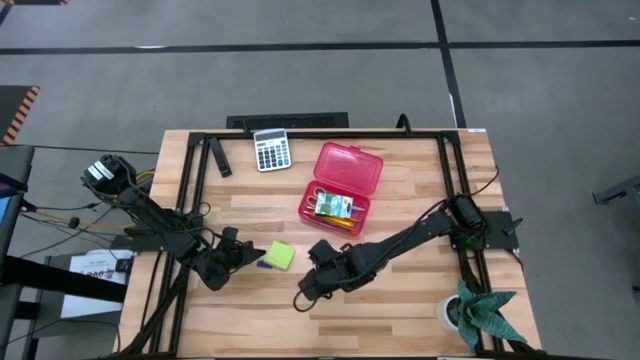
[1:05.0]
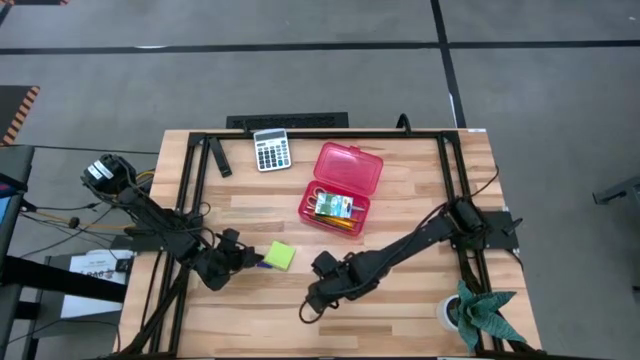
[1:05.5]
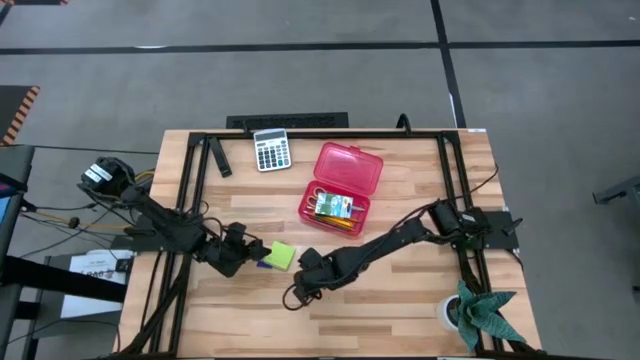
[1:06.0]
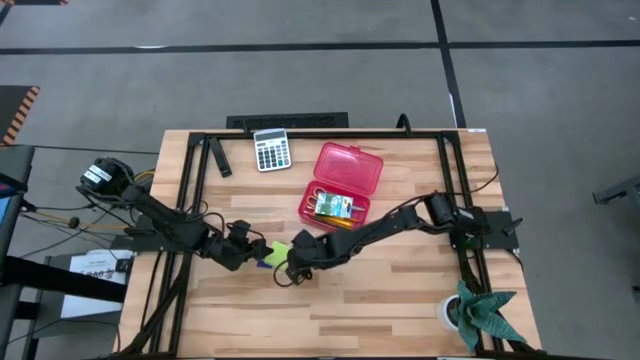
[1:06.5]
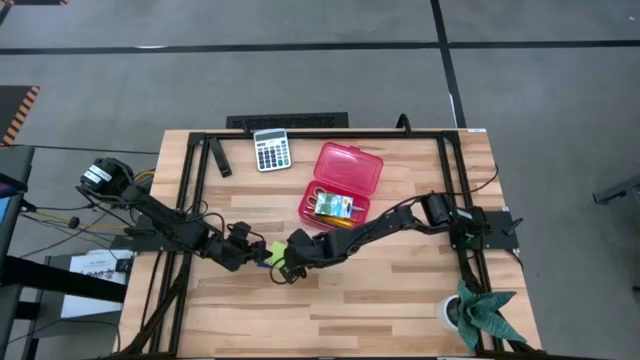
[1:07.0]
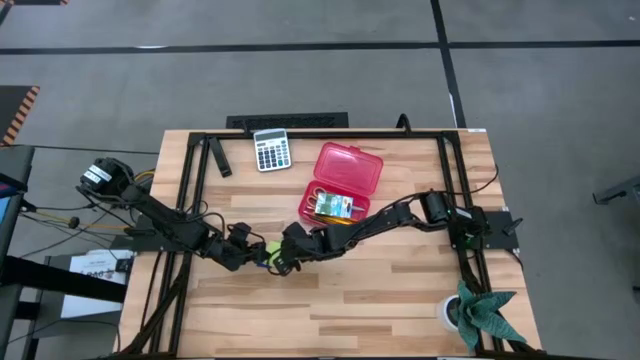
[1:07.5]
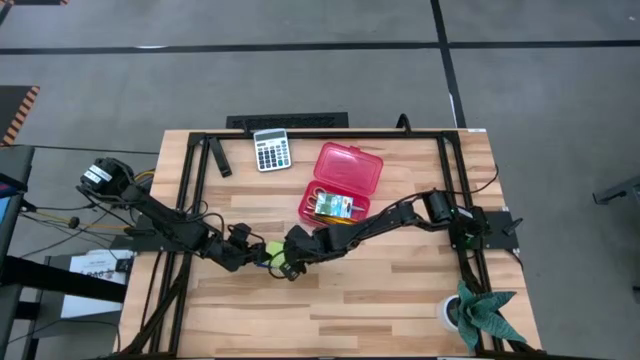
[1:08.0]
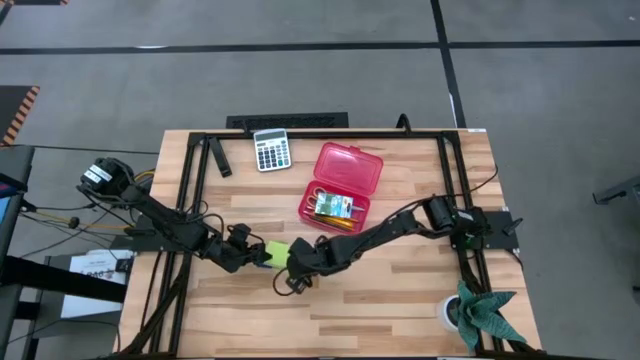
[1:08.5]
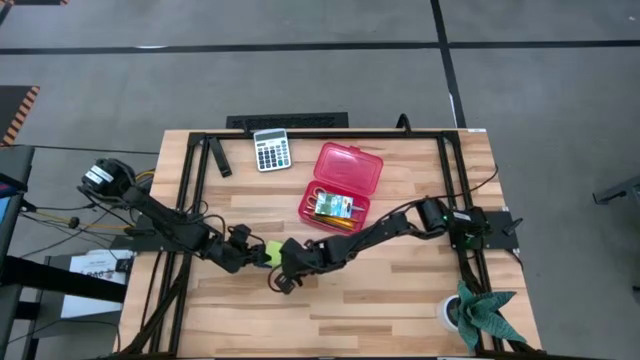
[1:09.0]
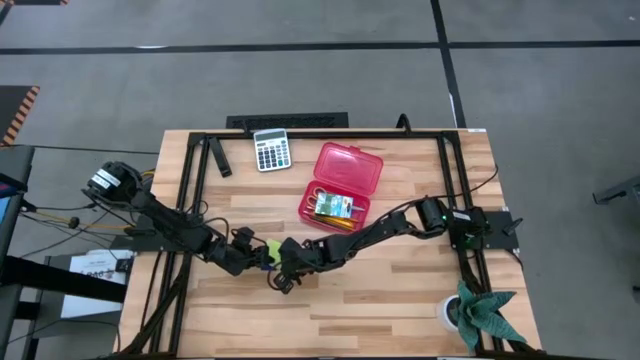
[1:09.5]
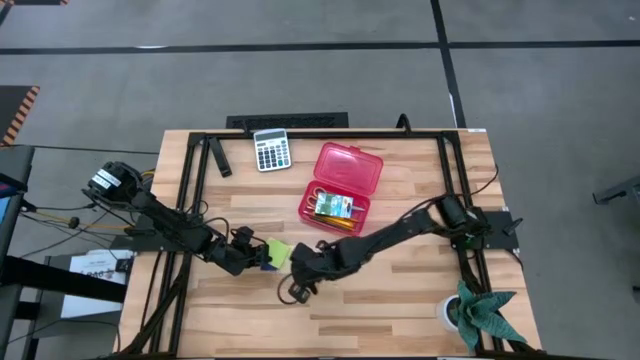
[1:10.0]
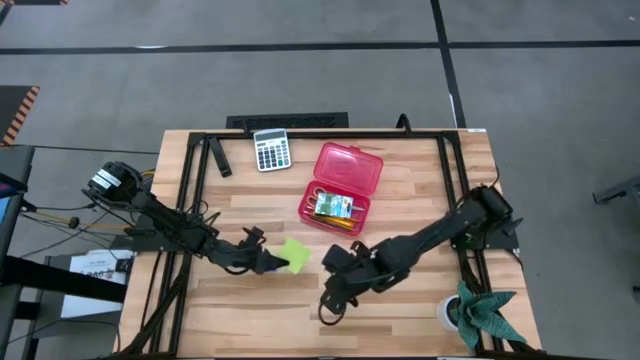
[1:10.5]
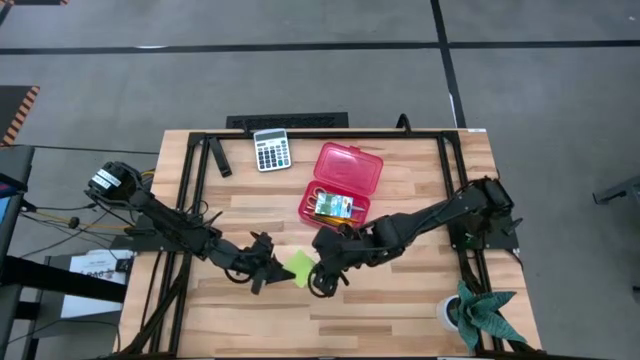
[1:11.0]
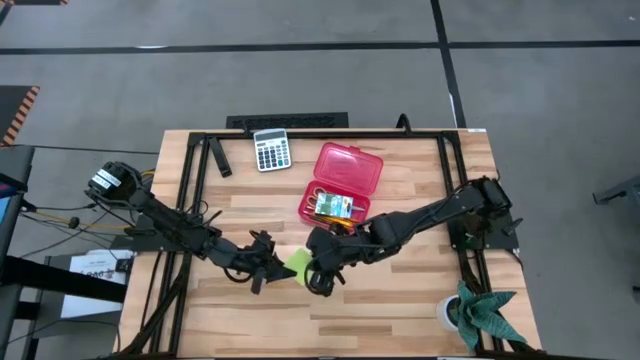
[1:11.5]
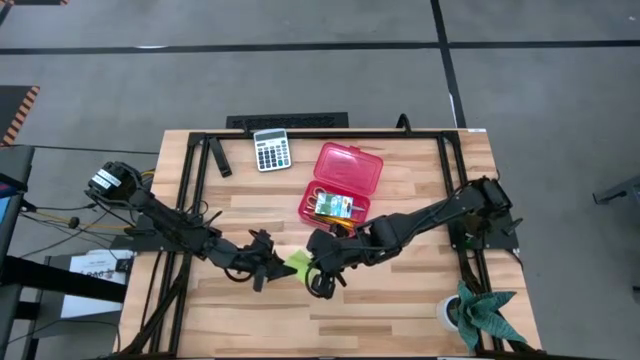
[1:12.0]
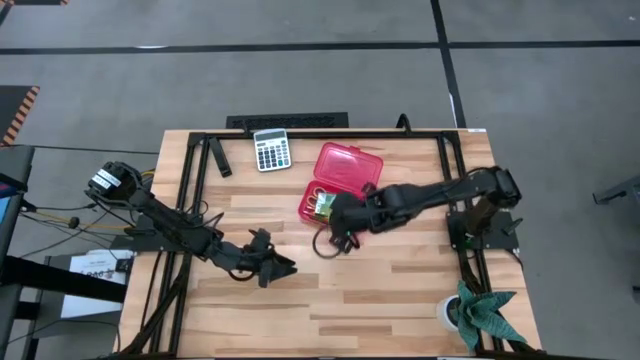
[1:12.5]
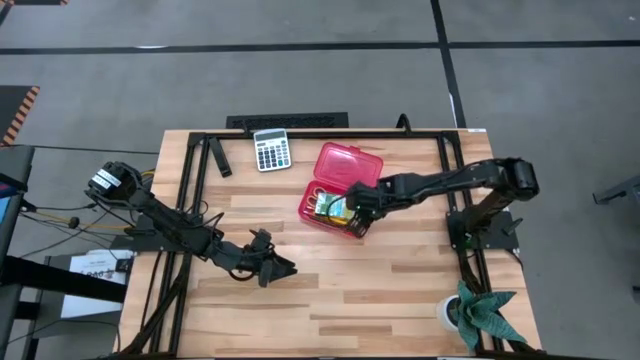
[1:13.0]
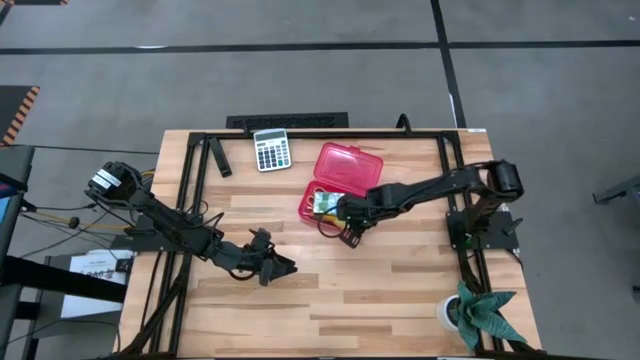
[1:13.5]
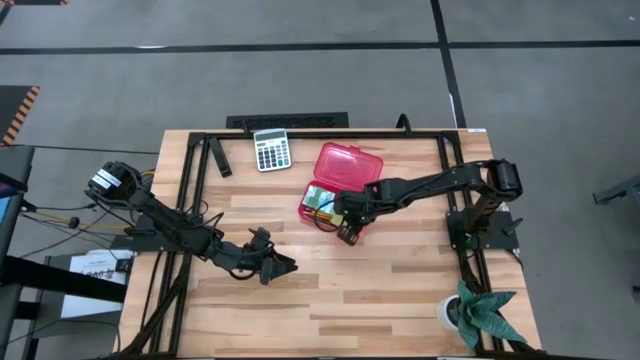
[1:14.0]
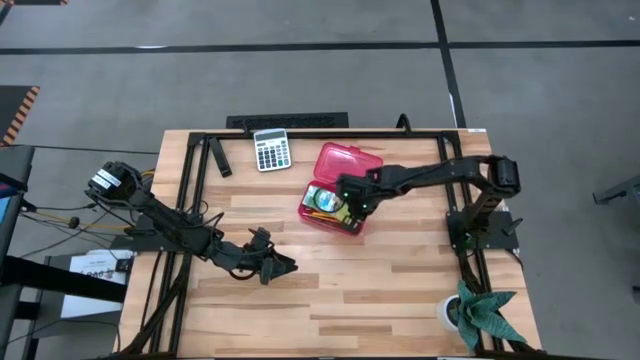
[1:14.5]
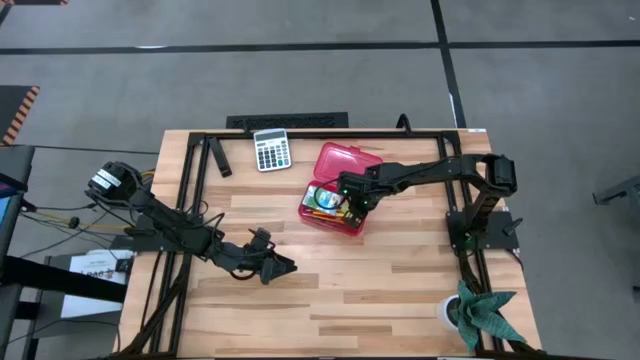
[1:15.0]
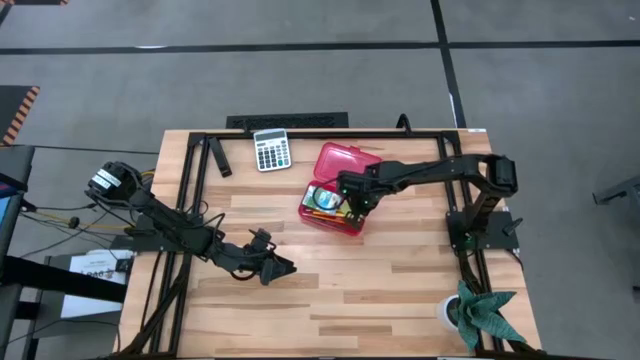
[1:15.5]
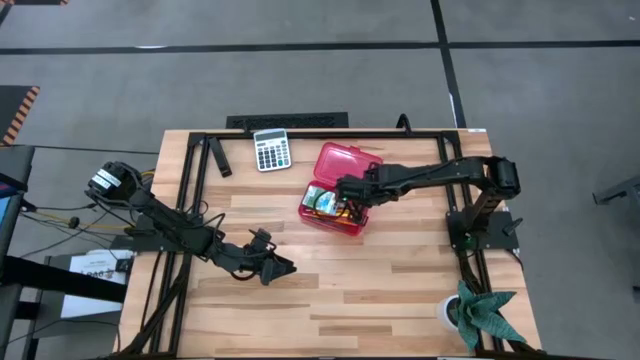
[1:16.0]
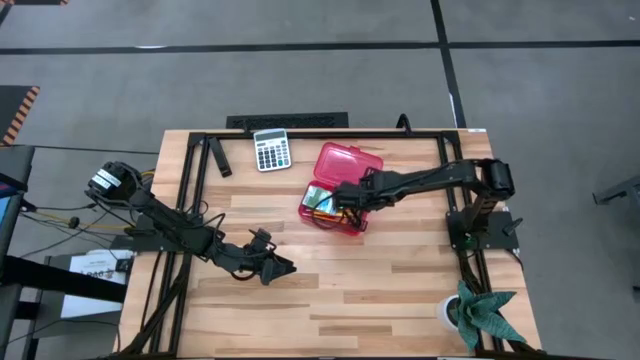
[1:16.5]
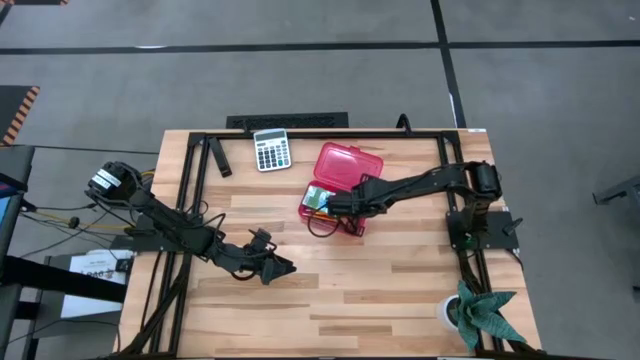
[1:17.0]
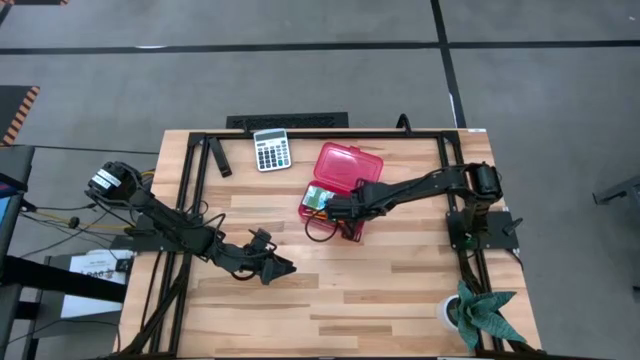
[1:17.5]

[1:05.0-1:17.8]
Task: Pack school essentials
Put the sticky note into the supply box

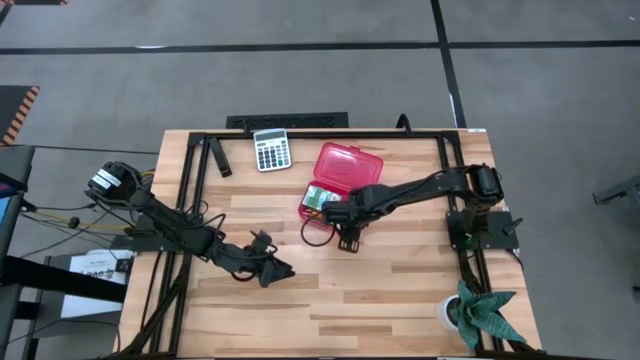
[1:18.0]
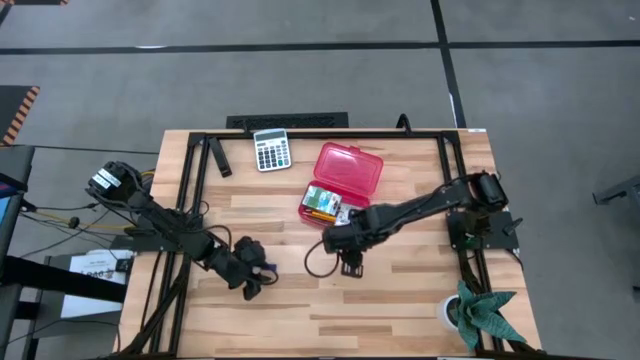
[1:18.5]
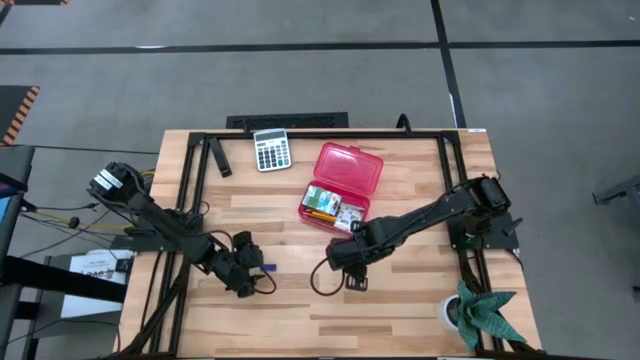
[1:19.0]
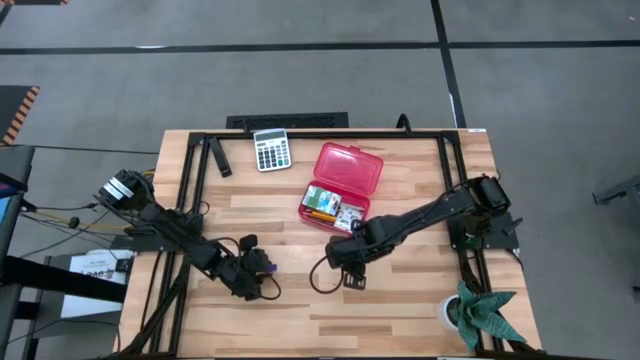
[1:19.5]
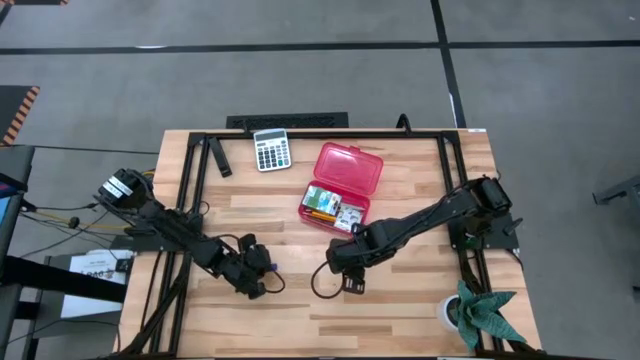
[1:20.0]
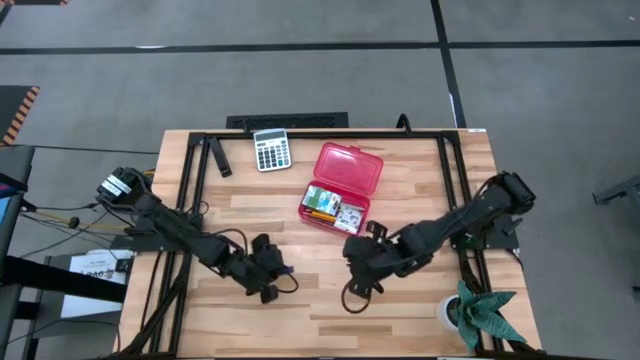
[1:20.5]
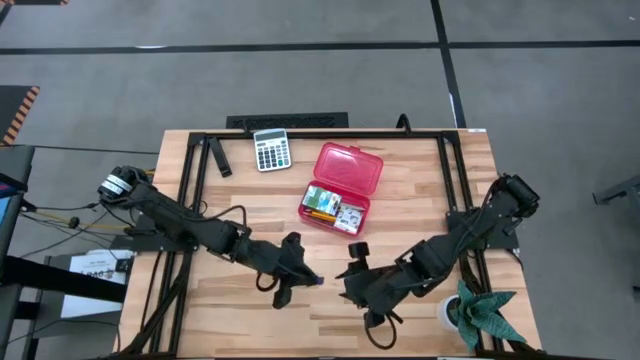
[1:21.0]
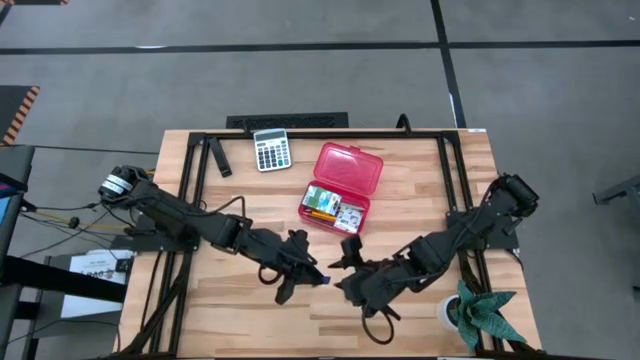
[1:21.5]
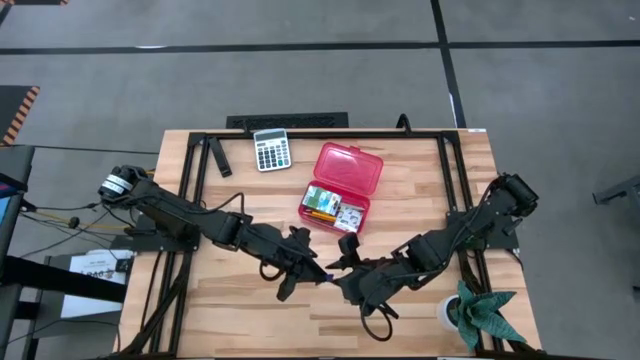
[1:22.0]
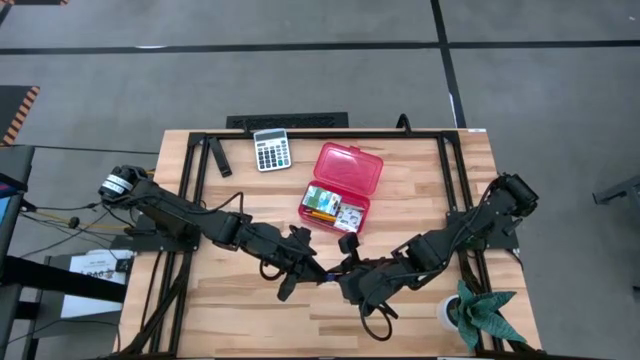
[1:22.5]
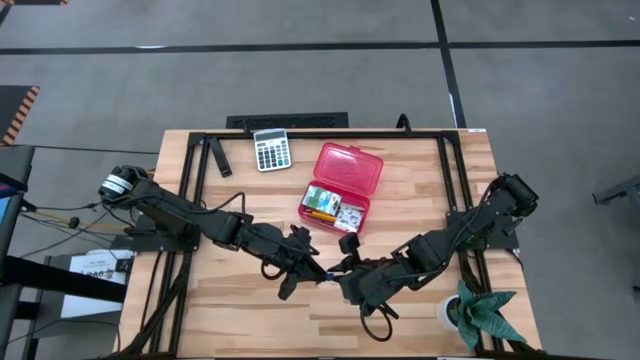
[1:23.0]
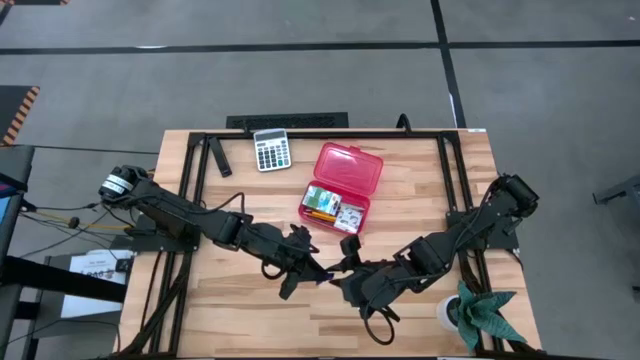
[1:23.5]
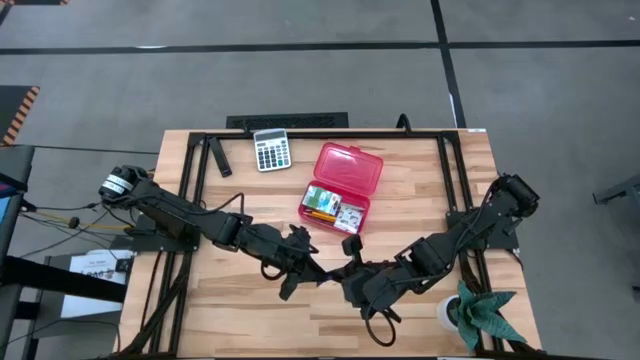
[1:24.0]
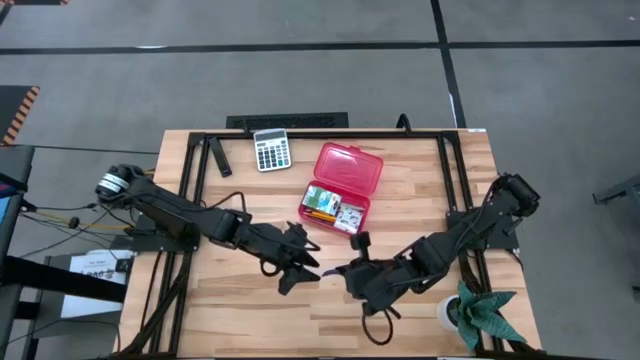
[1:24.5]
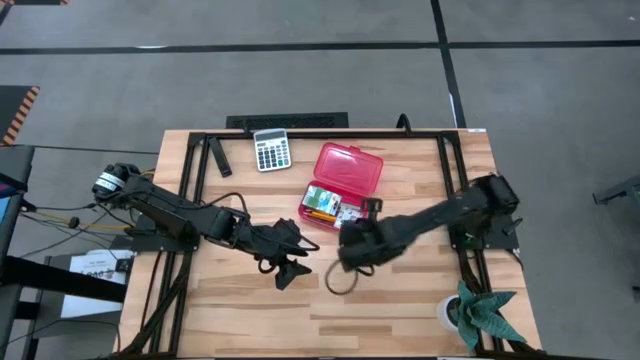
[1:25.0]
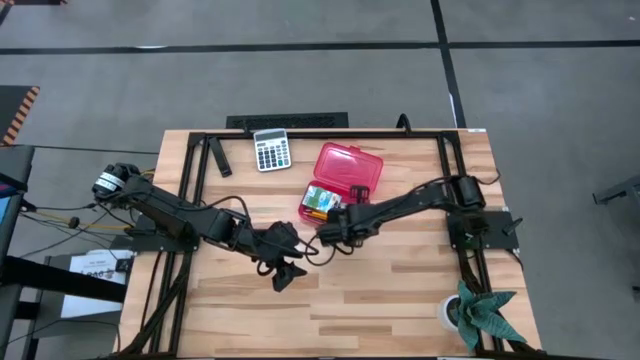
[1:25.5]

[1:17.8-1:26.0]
Put the eraser into the supply box

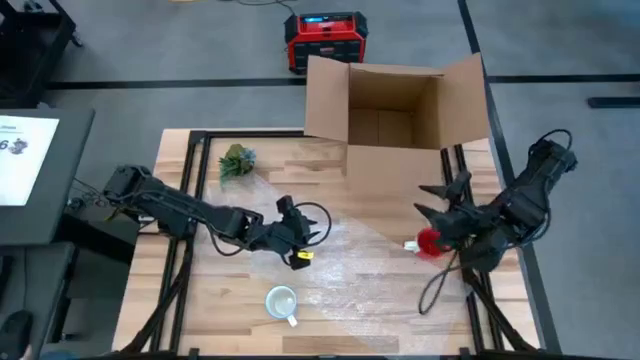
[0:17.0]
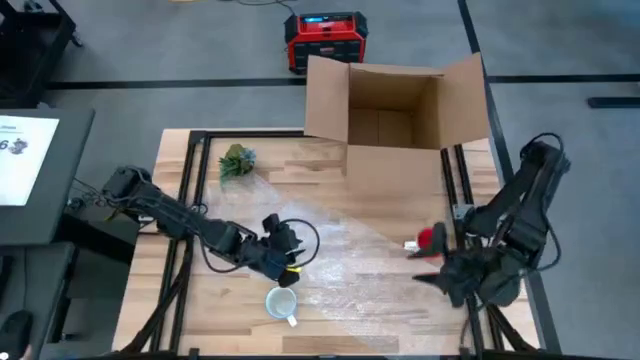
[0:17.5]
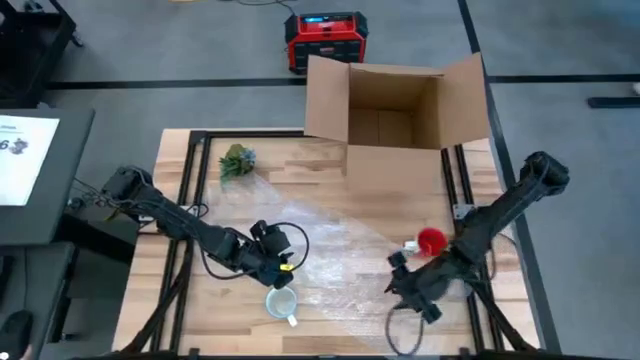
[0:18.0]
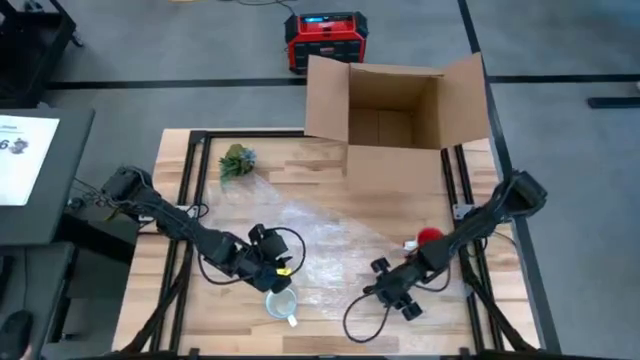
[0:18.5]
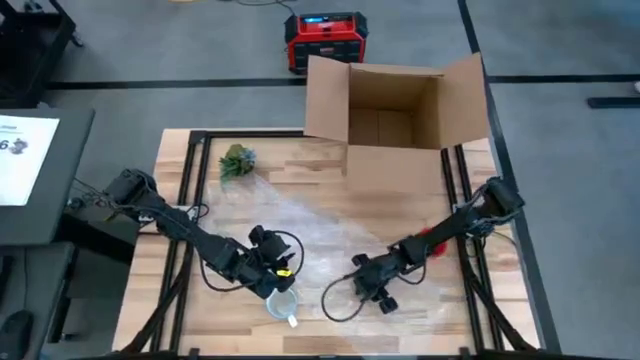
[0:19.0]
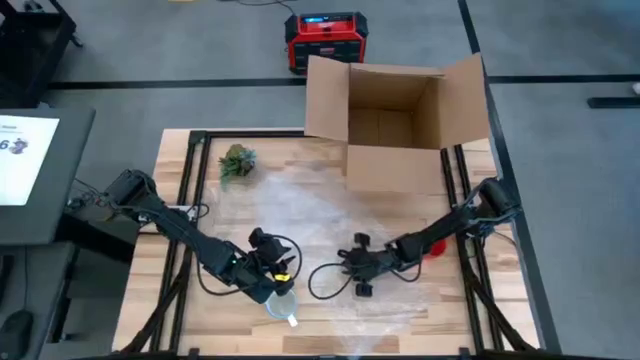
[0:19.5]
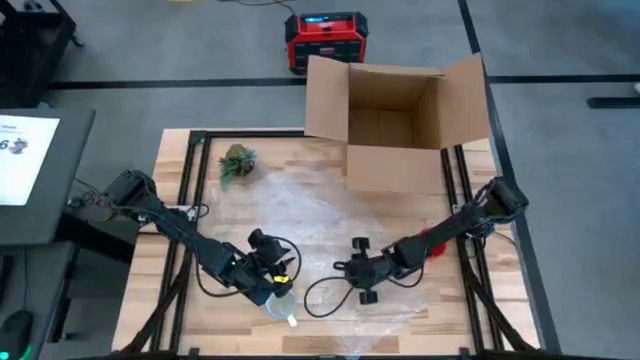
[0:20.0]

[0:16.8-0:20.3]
Task: wrap mug
Wrap the blue patterned mug with the transparent bubble wrap
